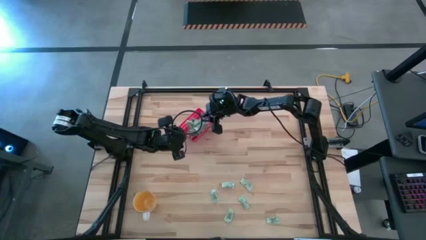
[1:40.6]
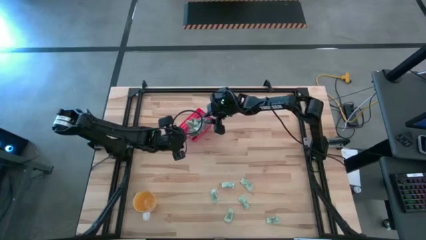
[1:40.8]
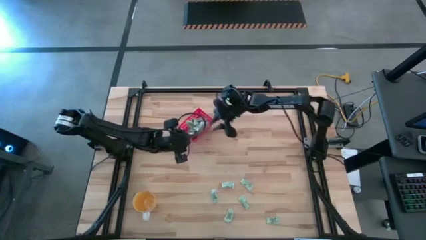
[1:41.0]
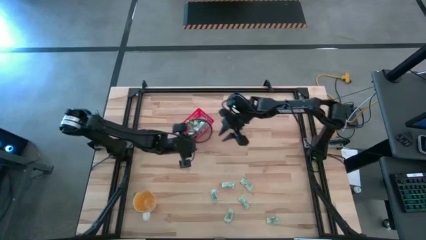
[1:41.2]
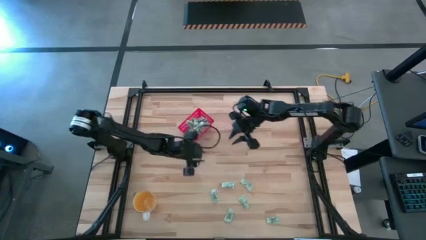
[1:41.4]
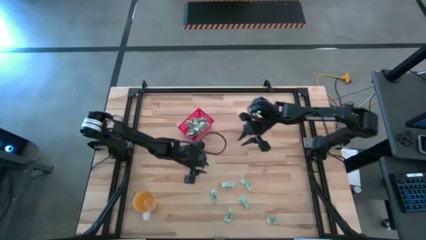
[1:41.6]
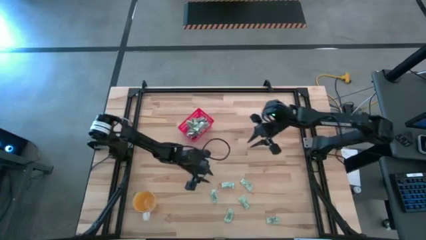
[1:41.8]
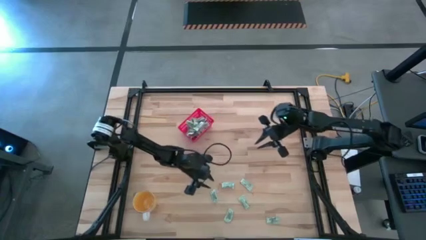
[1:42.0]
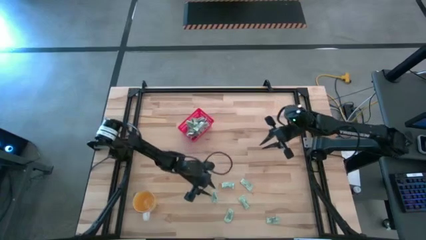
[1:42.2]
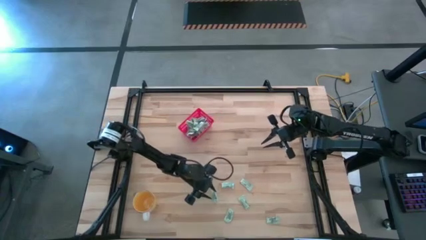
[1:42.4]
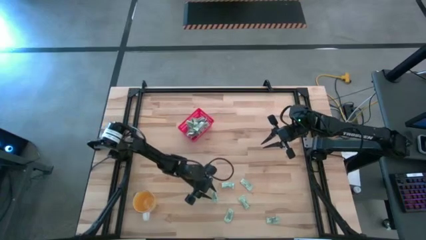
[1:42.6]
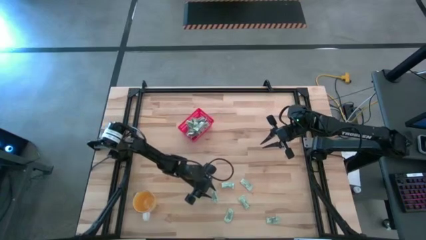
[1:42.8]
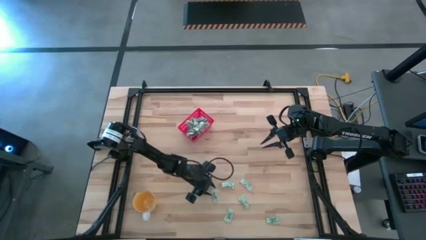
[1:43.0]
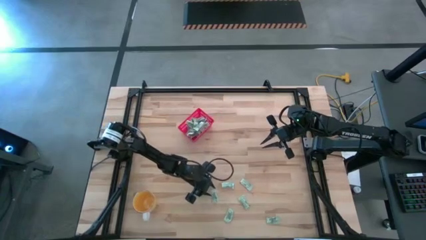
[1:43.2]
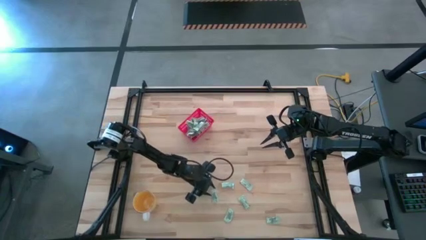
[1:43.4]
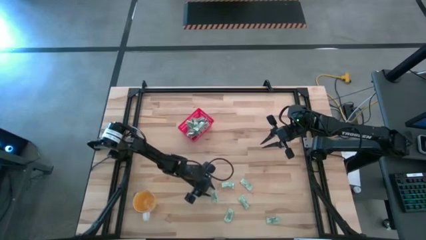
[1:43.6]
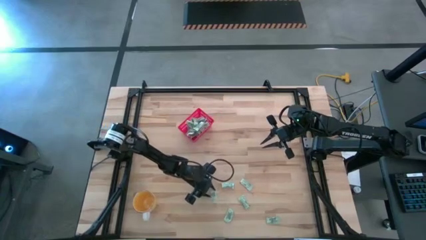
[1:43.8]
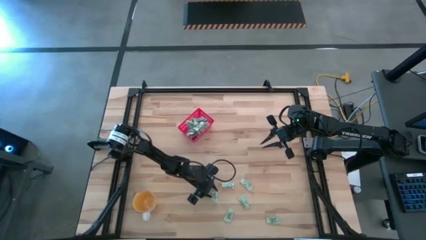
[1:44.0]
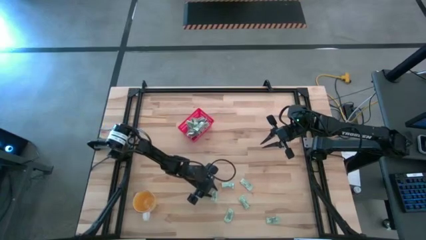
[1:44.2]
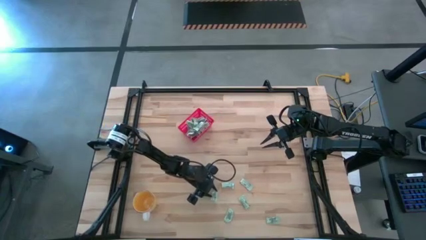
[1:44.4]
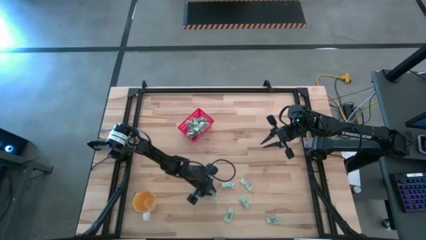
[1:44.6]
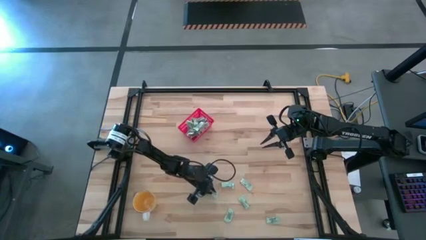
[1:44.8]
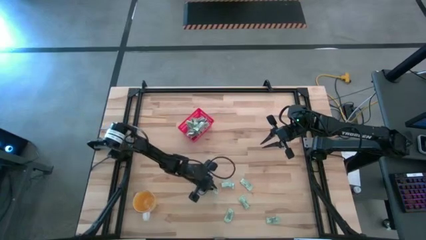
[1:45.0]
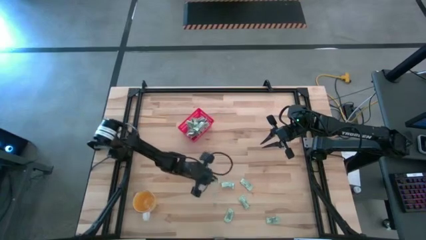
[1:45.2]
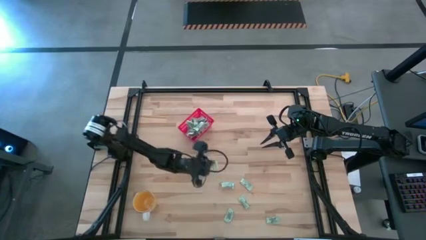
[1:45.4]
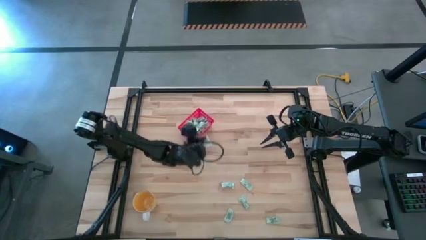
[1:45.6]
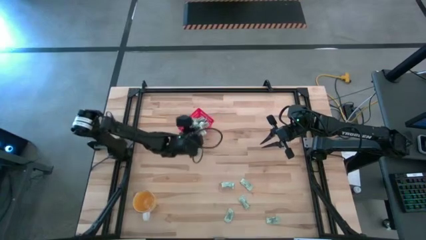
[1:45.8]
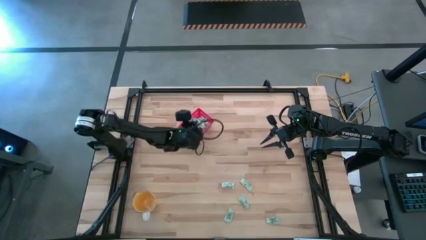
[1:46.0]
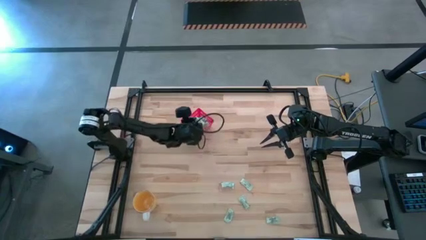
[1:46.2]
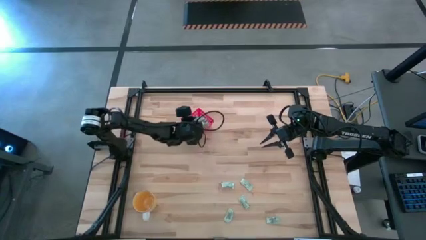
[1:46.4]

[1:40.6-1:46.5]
Task: Pick and place Stevia / Truvia into bins
Put the white stevia packet into the red bin

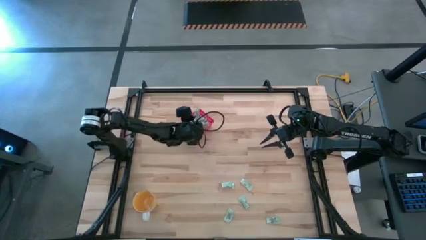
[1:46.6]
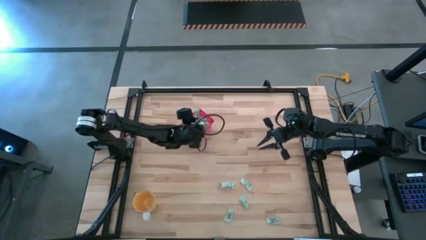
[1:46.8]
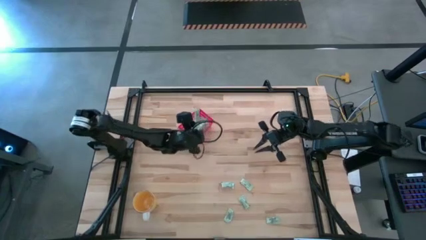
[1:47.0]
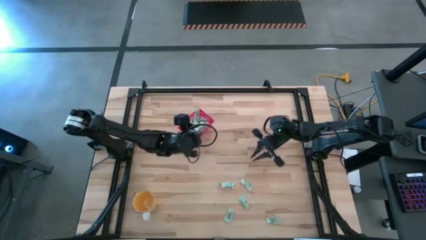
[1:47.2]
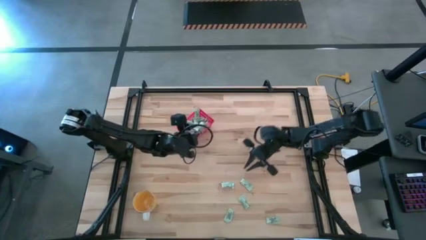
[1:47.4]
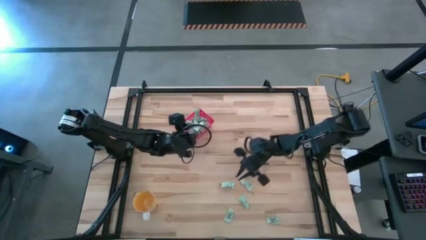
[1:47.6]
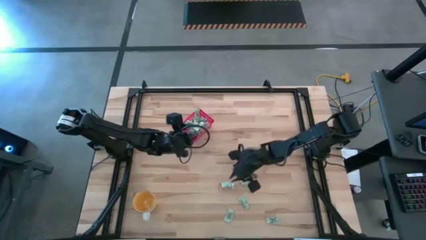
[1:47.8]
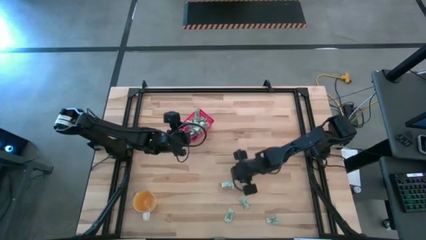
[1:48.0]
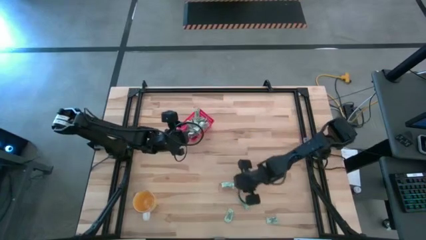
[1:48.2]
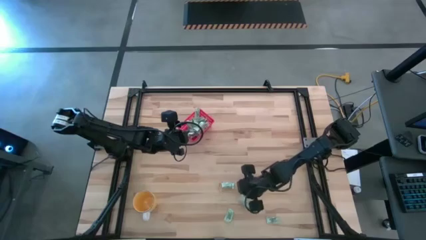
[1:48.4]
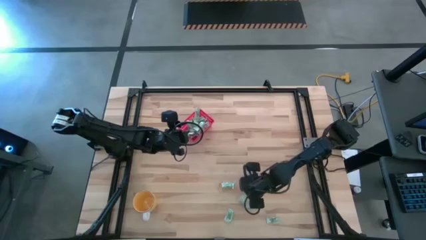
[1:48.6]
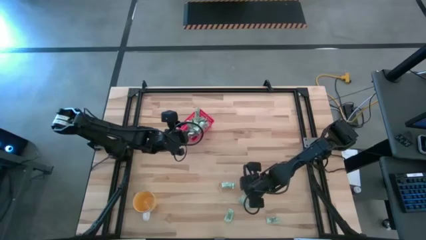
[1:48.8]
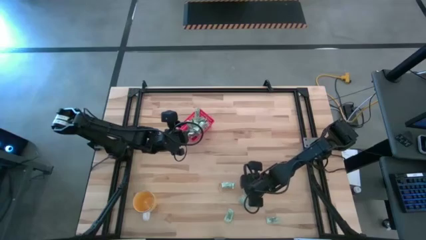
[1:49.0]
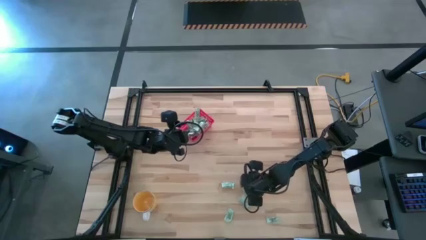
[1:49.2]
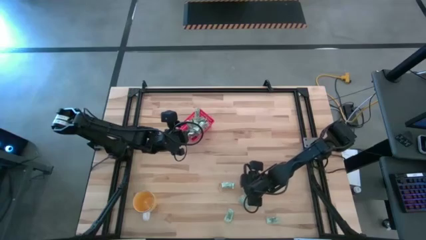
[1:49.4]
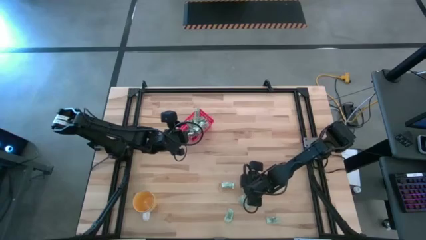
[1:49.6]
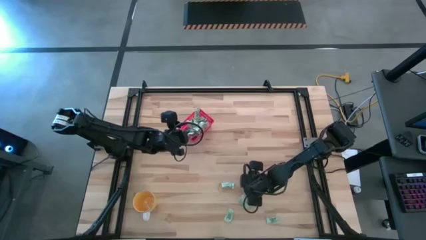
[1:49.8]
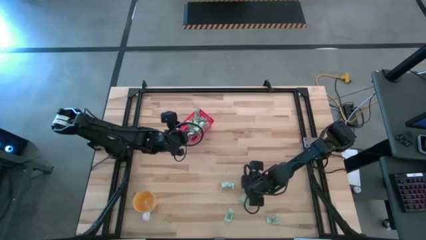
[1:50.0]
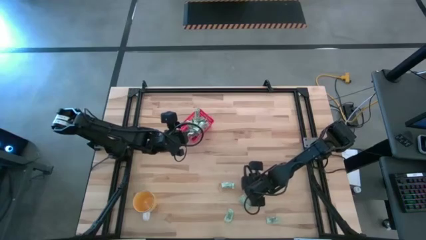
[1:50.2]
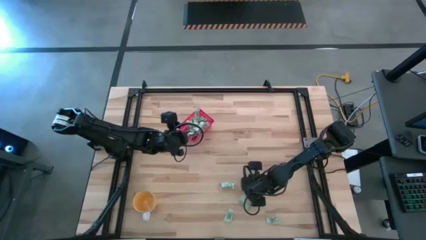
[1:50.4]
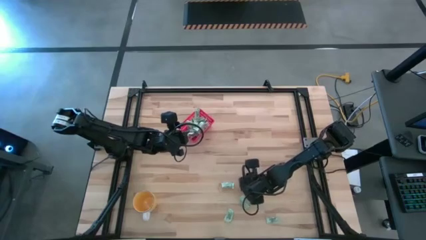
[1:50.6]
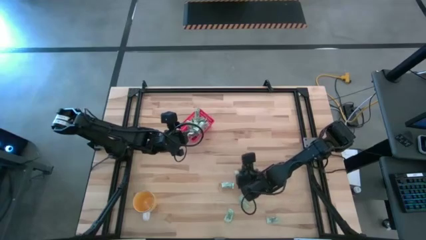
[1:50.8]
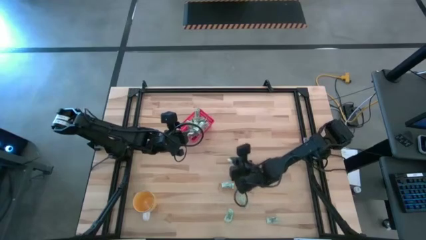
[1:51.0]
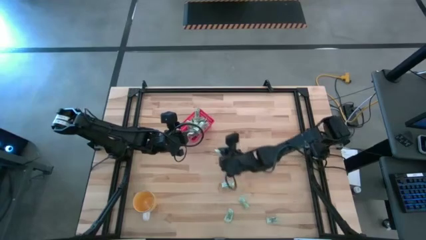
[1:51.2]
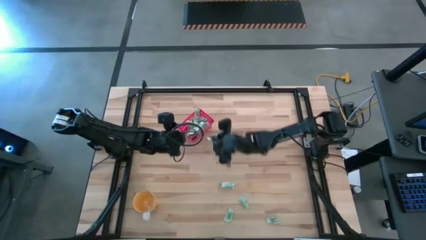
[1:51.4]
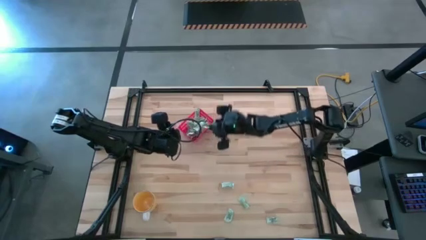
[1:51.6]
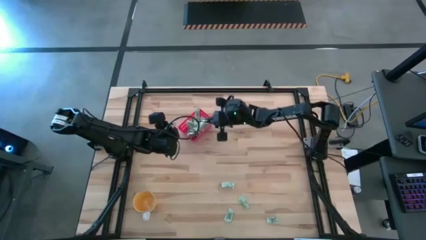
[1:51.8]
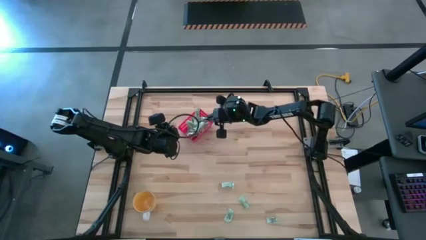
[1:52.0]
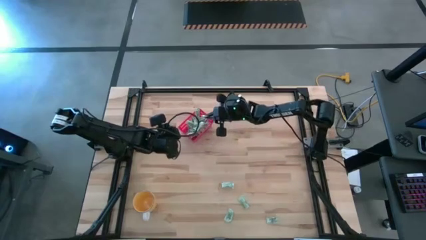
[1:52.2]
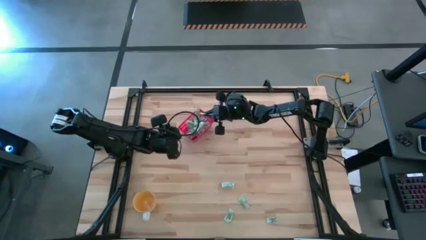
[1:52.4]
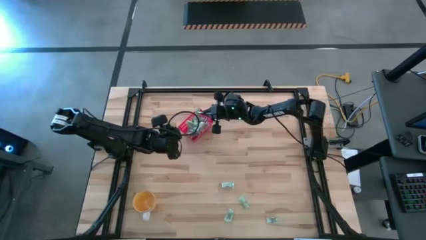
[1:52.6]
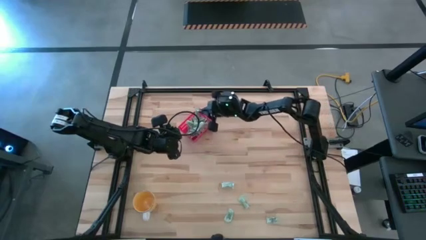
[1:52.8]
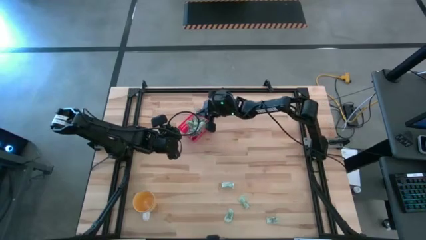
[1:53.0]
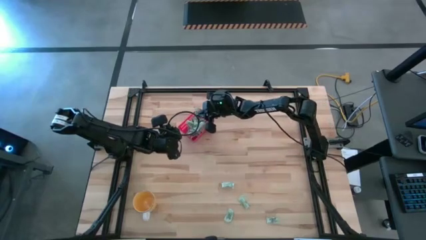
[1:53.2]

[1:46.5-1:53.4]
Put the white stevia packet into the red bin

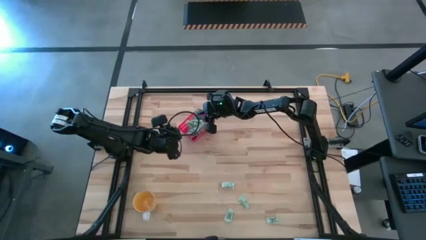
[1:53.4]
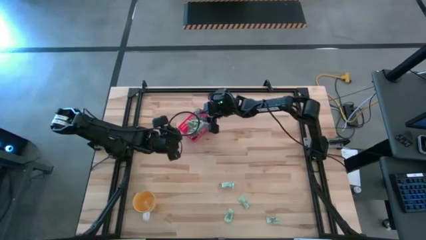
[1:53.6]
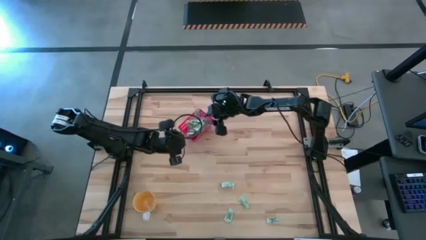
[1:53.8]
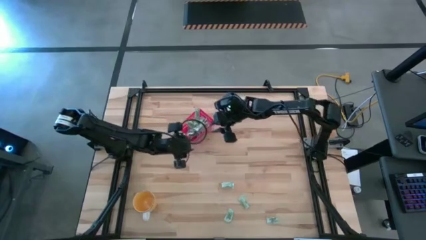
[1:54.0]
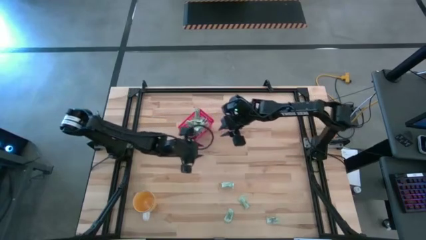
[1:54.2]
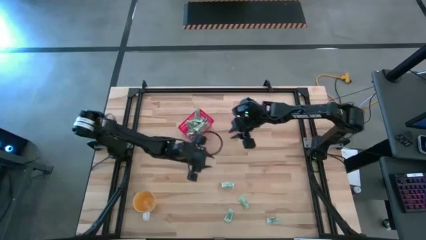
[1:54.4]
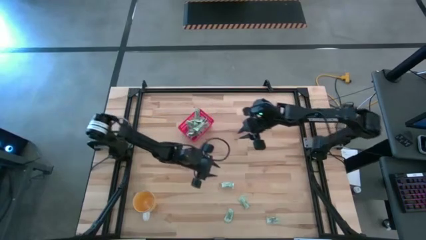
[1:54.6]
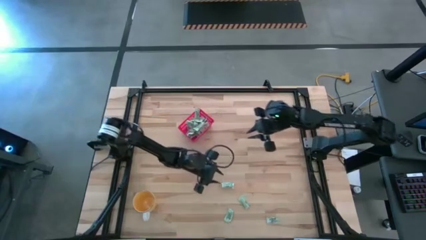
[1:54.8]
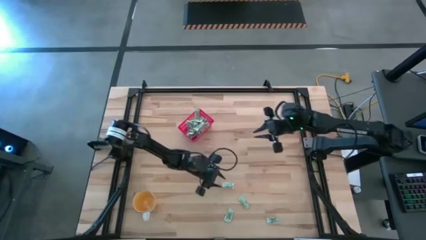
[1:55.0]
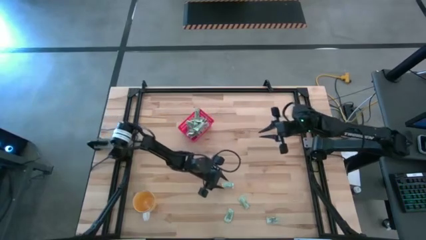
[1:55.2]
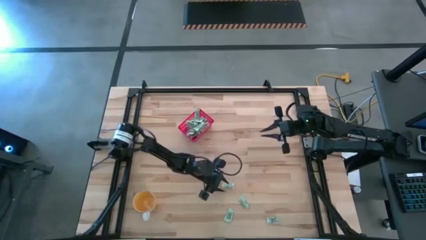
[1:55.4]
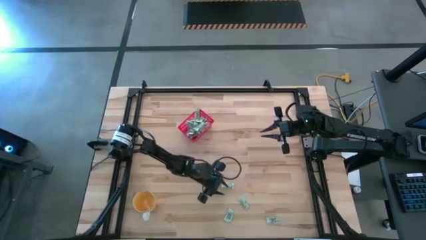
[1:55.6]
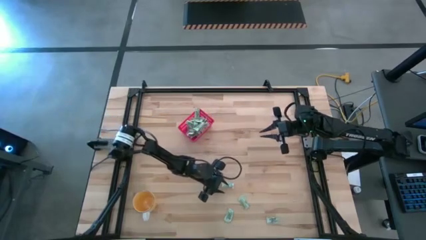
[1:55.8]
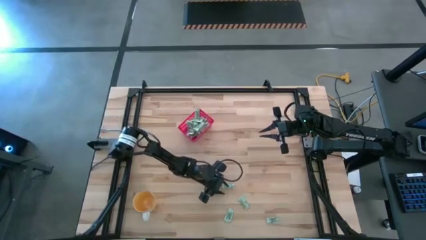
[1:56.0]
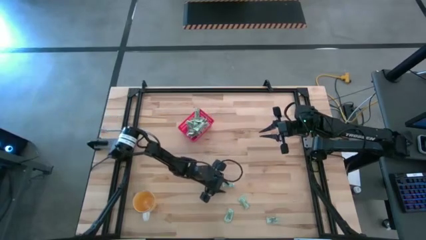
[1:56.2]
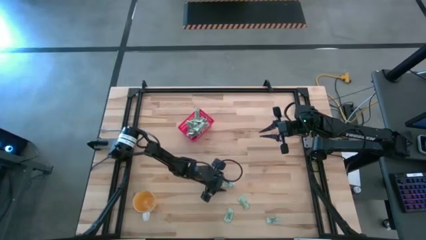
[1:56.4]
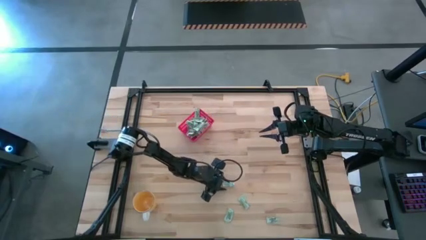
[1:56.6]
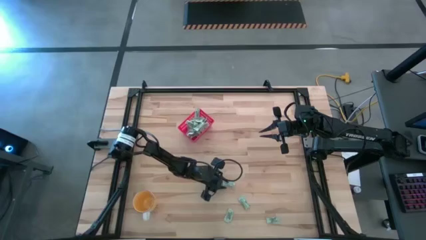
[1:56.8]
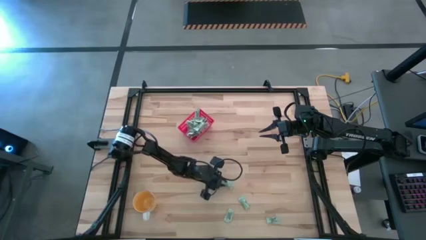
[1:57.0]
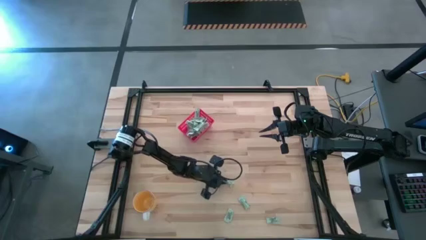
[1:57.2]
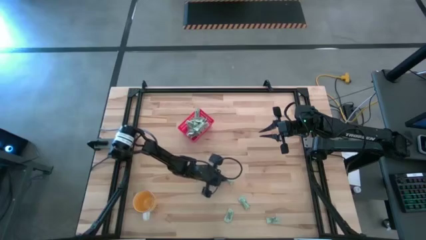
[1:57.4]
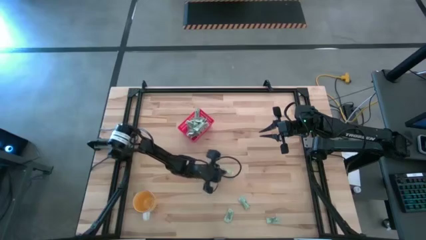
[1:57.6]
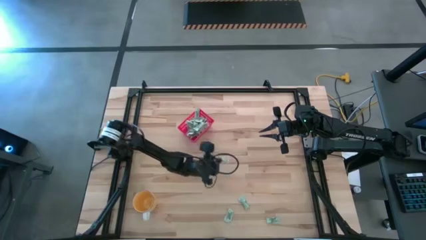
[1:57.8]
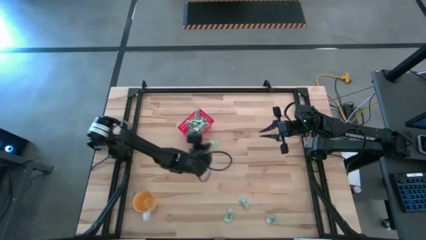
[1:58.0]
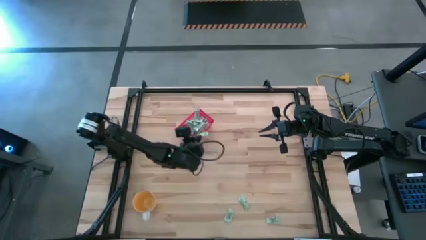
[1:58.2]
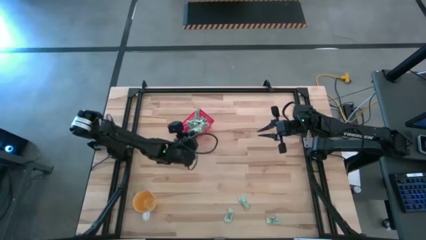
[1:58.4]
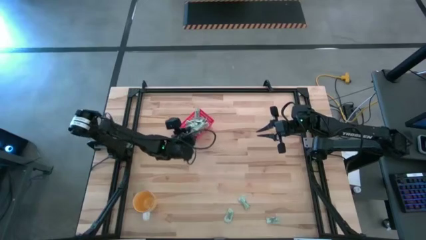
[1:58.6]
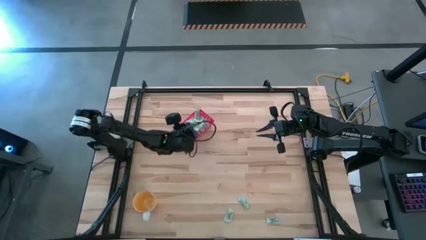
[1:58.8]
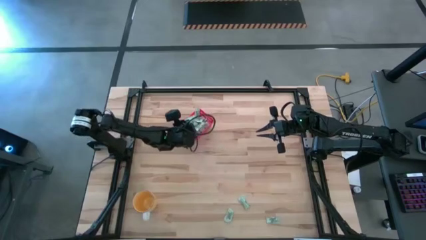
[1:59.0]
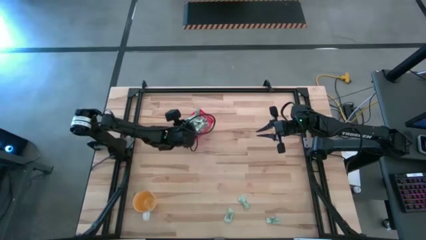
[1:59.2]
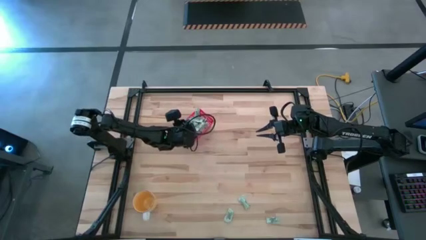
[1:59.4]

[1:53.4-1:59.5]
Put the white stevia packet into the red bin
